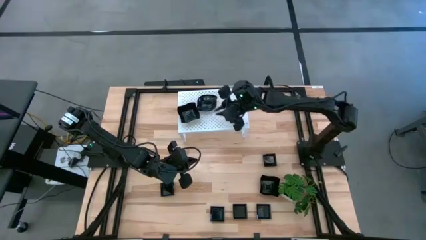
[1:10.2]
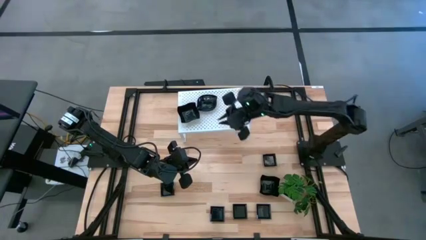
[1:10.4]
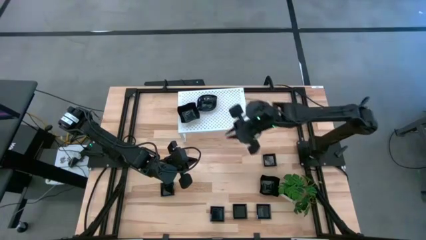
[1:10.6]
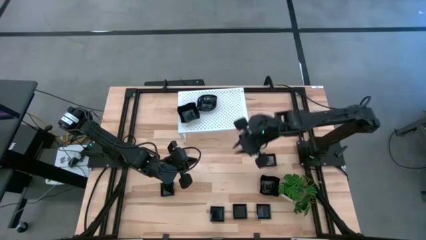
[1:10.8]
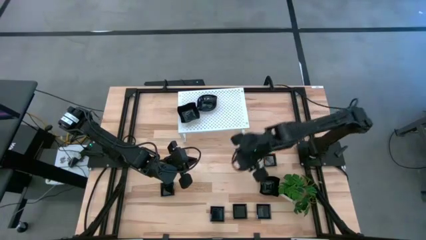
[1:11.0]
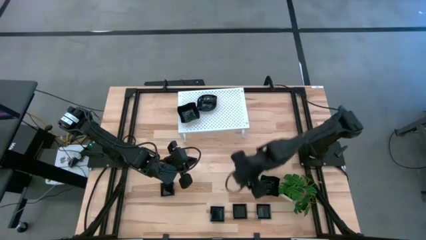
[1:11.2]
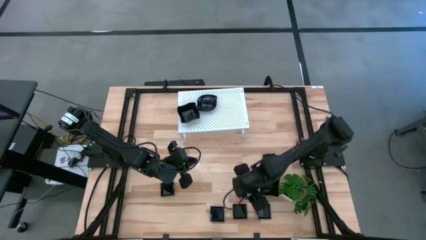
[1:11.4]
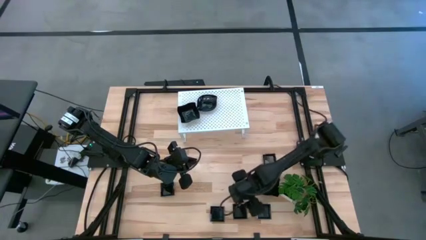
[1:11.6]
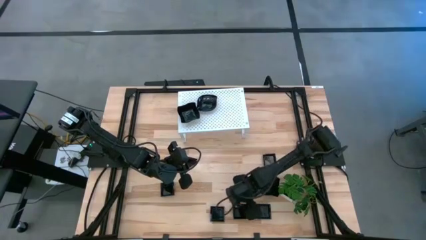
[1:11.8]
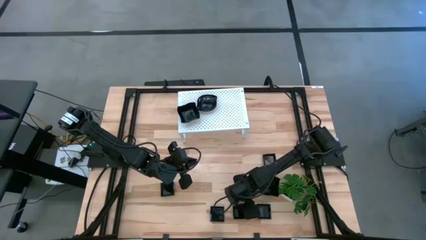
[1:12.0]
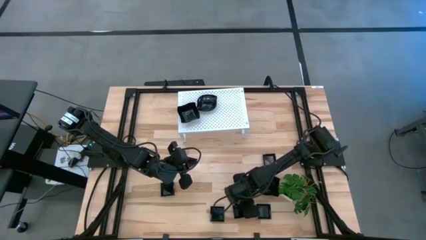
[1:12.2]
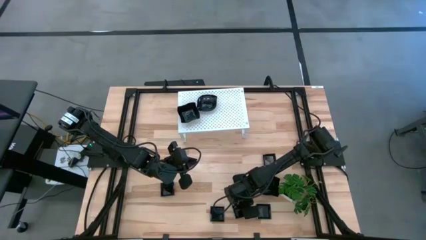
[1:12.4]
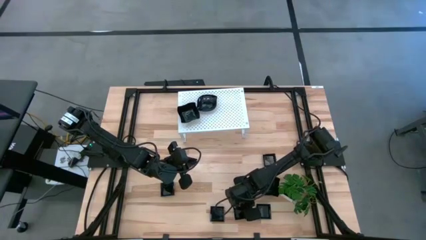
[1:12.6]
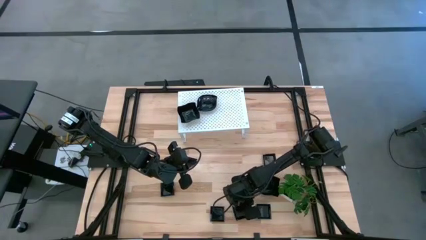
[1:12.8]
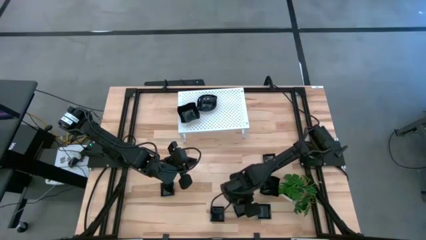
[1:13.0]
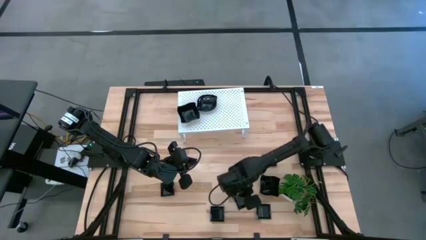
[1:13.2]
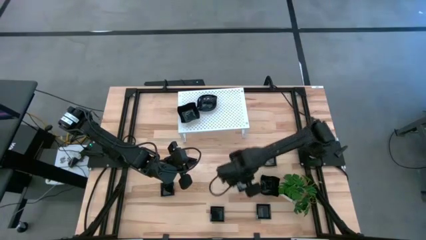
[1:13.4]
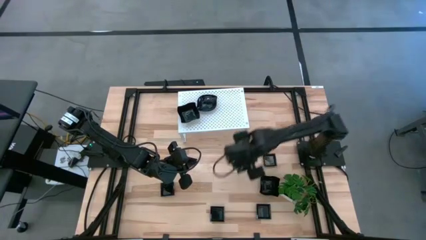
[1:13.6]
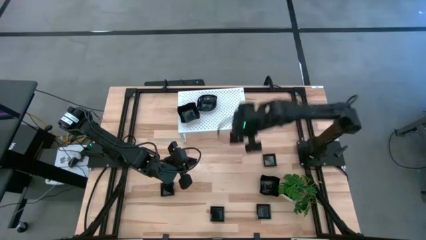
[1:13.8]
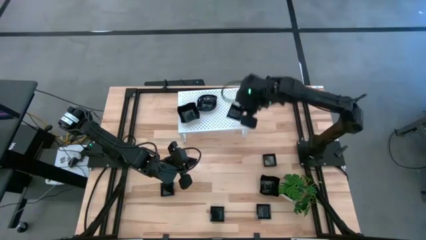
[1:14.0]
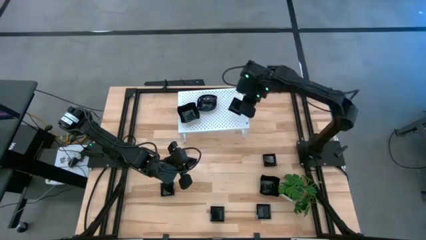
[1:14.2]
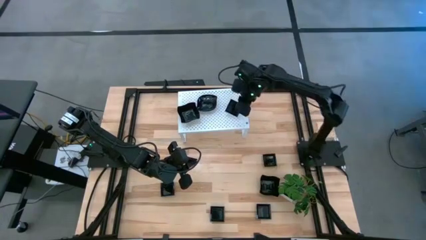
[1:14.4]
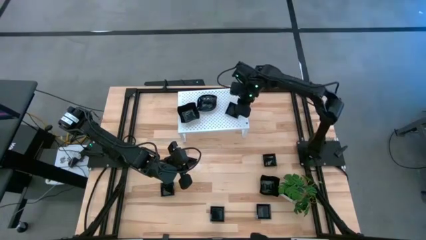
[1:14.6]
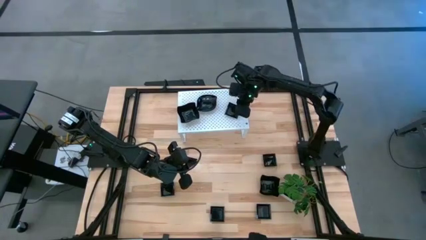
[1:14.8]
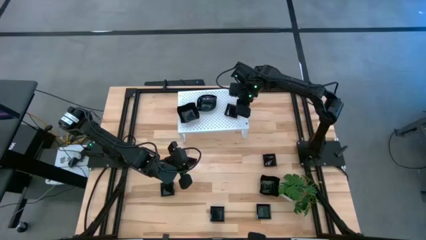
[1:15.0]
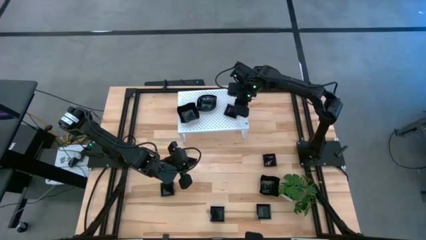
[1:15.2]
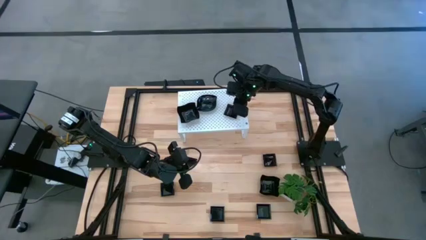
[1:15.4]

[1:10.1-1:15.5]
Task: Pick & Place Mini shaped plates
Put the black square plate on the shelf

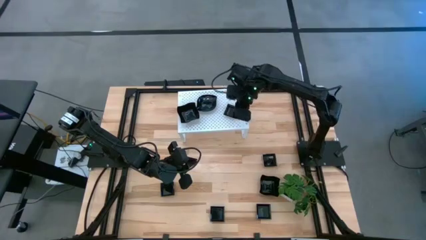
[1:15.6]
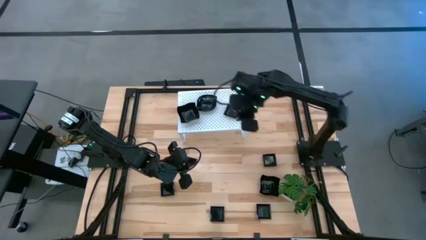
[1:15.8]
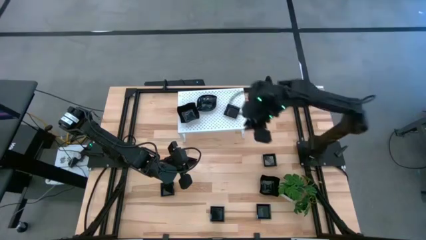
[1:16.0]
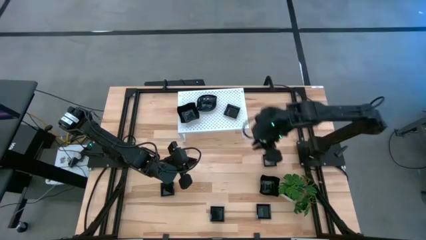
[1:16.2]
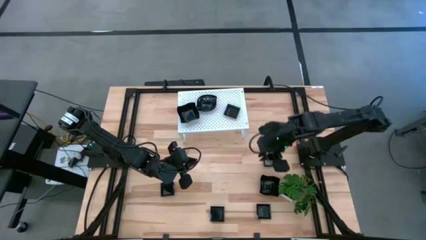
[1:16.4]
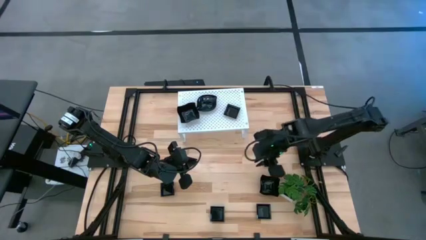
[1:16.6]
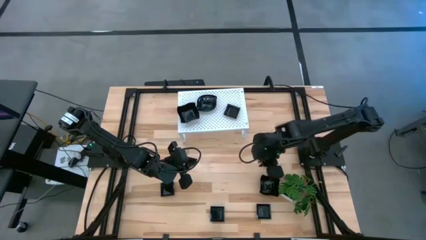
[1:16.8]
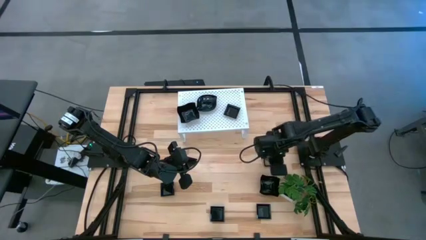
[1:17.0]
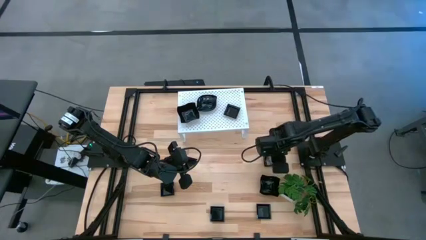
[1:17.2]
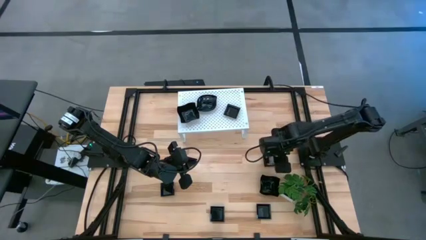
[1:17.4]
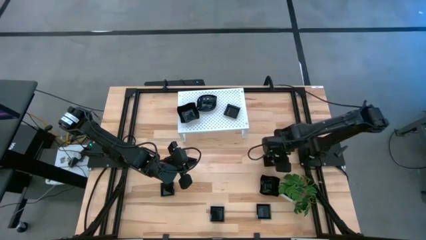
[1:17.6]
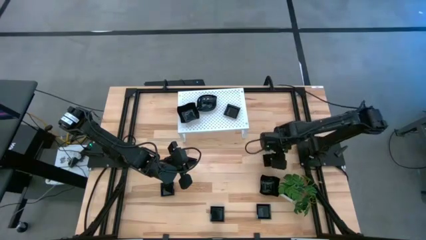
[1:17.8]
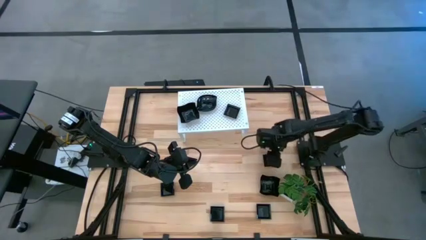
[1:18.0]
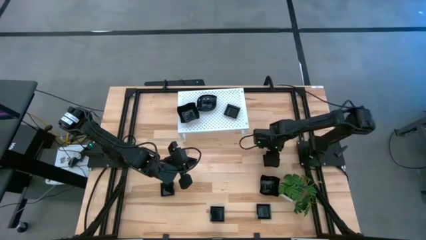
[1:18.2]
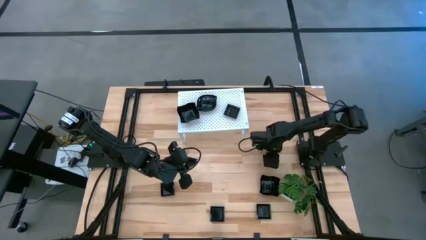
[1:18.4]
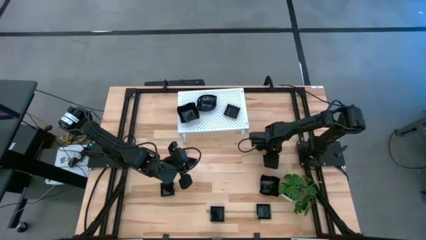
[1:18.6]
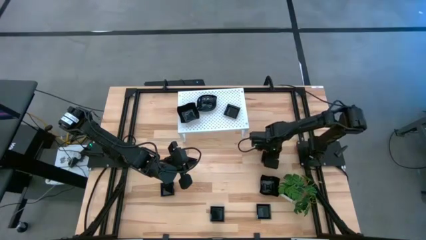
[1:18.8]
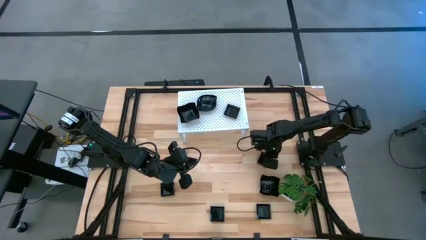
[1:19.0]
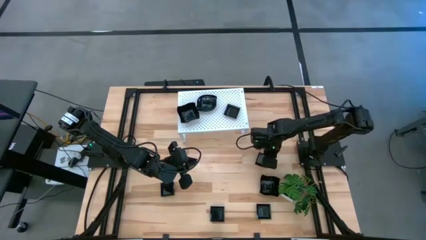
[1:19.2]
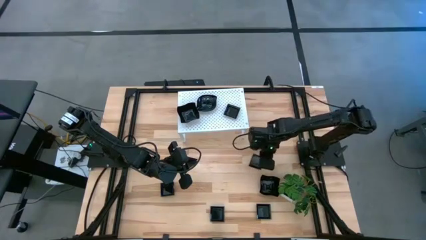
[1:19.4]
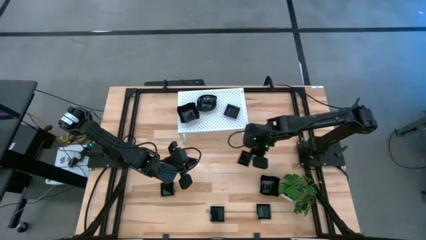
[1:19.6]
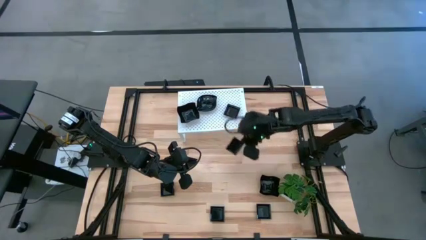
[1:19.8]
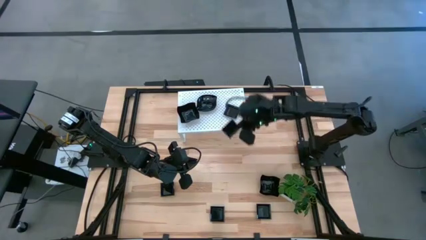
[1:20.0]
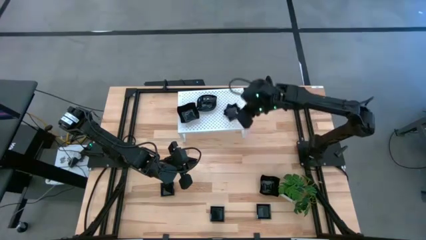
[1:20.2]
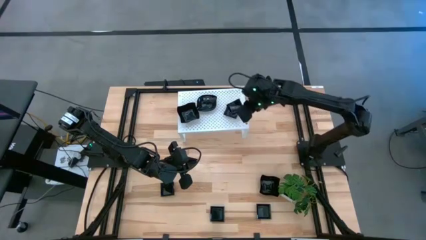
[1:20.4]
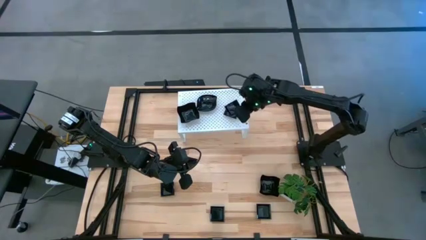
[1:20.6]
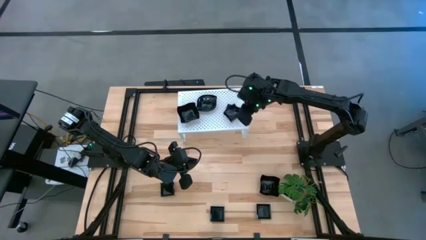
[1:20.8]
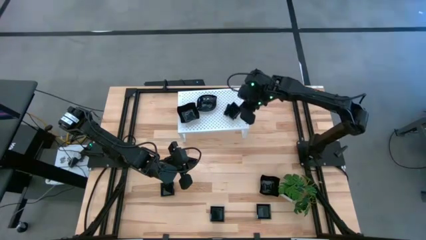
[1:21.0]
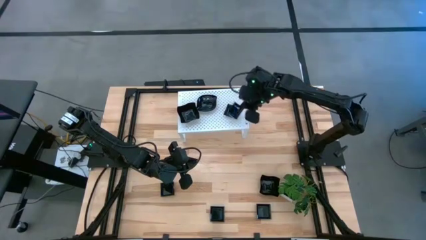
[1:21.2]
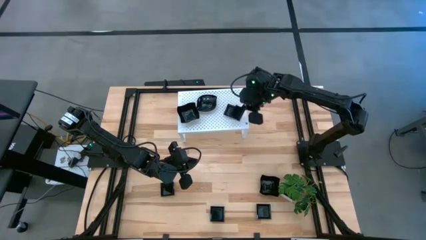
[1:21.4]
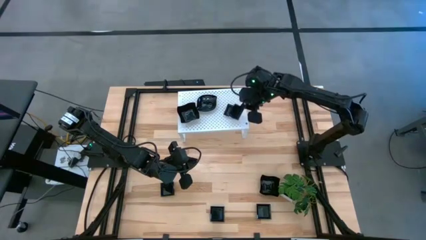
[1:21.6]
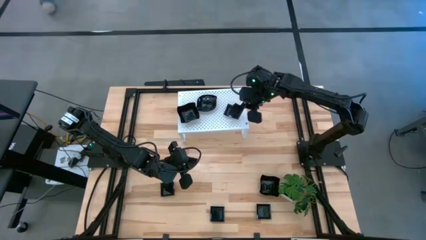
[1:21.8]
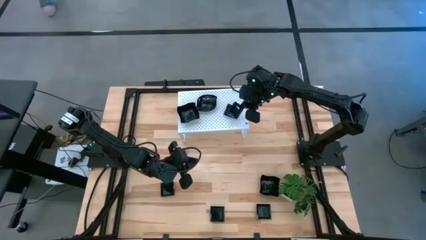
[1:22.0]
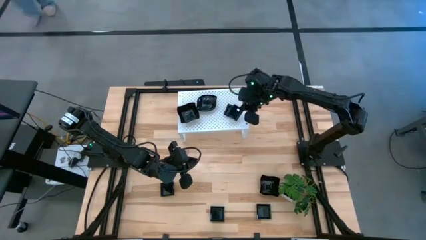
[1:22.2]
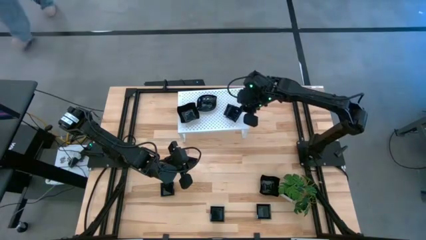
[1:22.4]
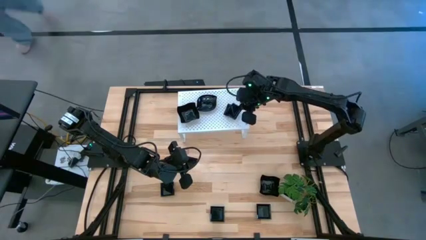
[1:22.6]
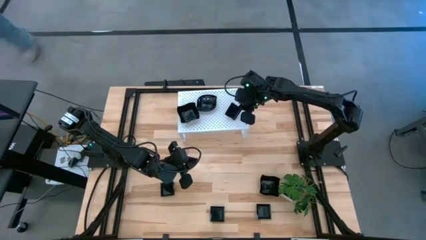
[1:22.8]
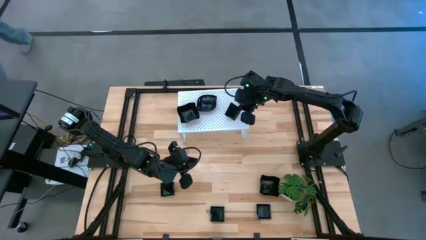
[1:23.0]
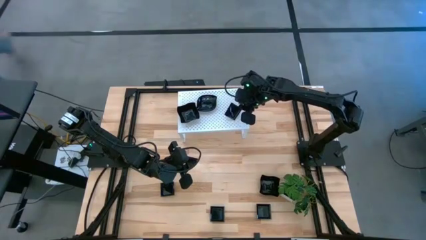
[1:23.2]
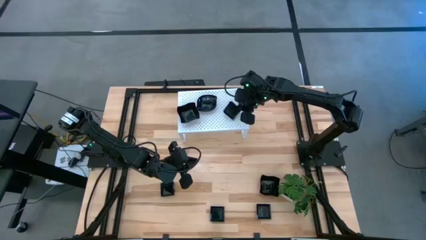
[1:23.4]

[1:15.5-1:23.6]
Stack the black square plate on top of the black square plate on the shelf

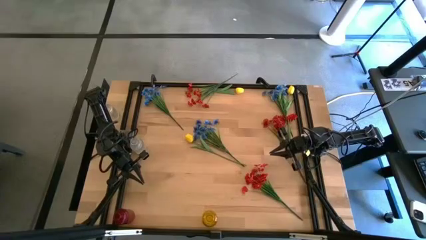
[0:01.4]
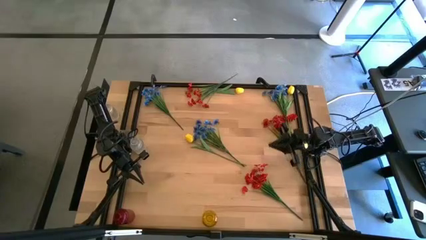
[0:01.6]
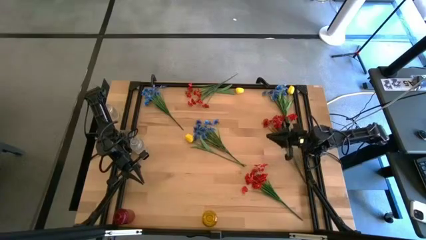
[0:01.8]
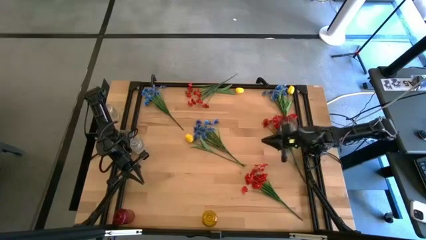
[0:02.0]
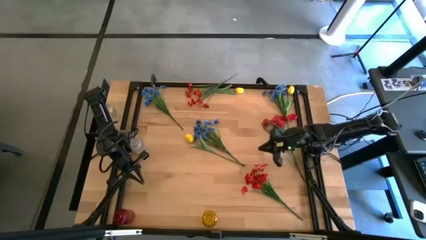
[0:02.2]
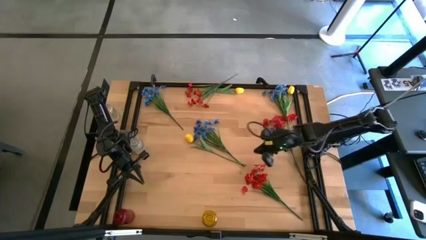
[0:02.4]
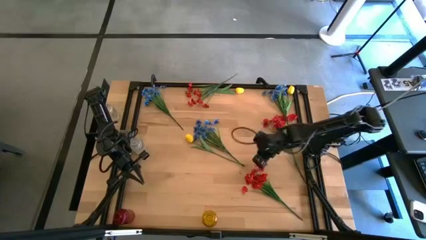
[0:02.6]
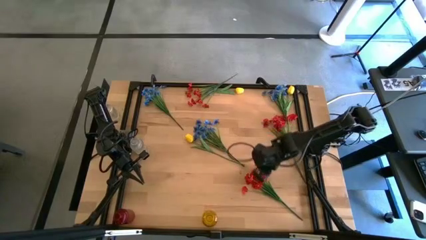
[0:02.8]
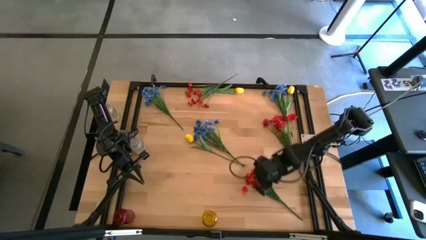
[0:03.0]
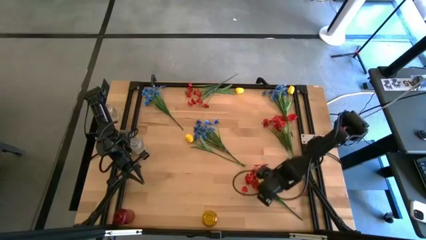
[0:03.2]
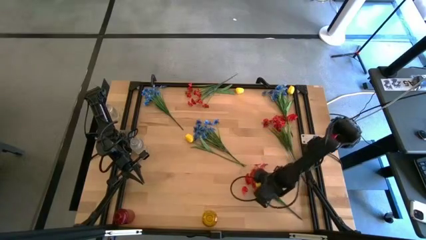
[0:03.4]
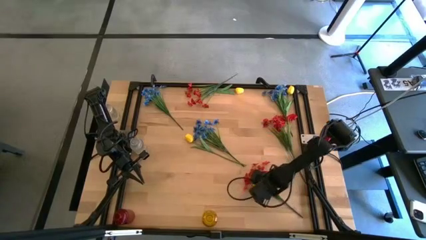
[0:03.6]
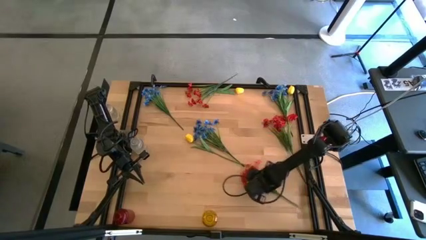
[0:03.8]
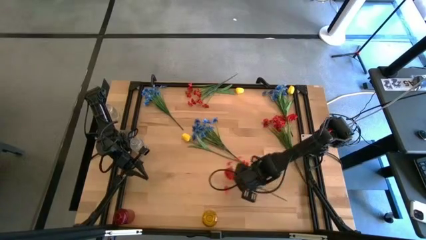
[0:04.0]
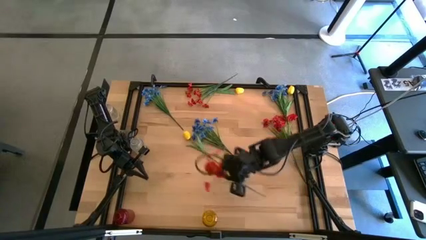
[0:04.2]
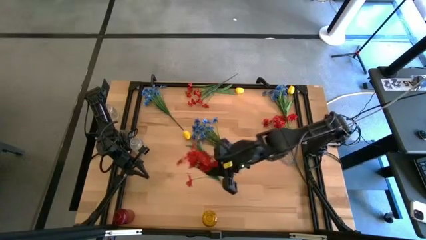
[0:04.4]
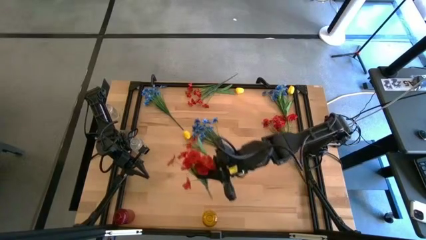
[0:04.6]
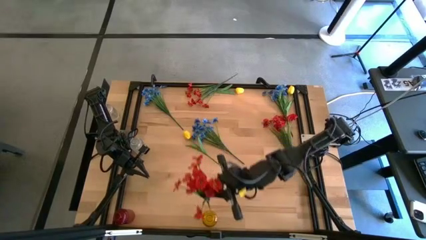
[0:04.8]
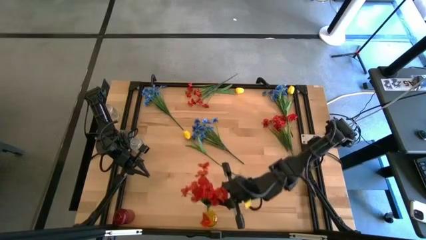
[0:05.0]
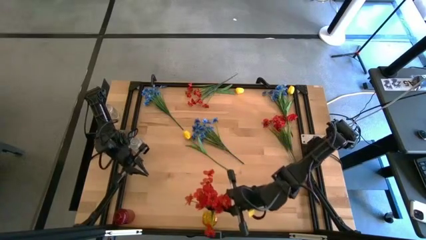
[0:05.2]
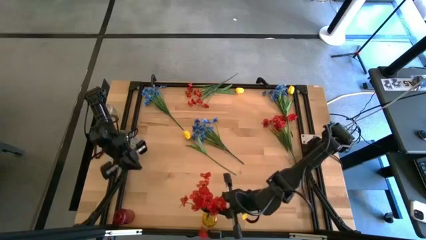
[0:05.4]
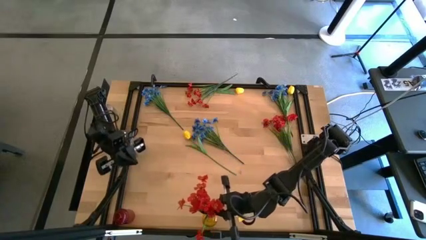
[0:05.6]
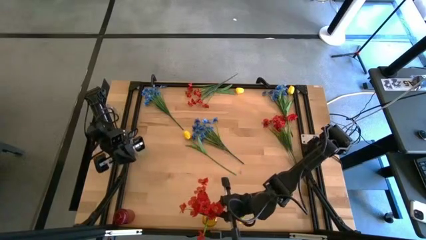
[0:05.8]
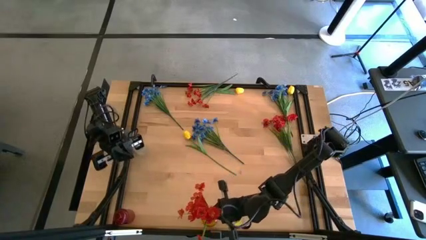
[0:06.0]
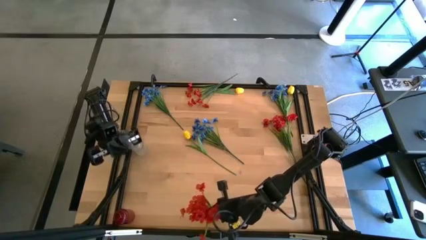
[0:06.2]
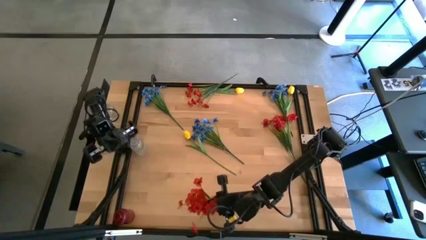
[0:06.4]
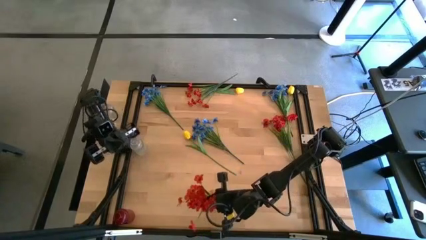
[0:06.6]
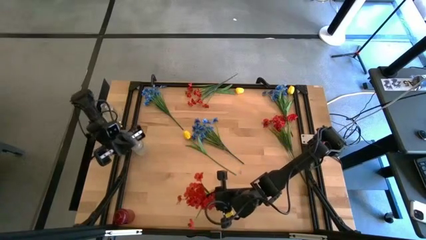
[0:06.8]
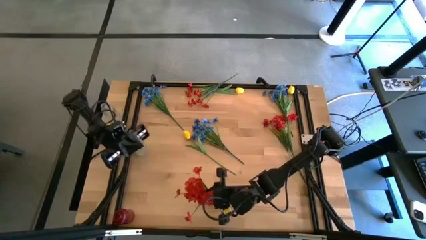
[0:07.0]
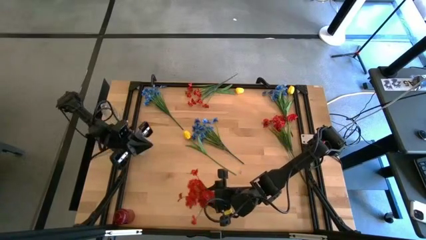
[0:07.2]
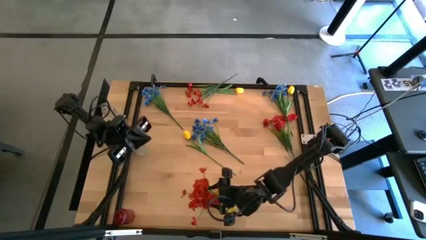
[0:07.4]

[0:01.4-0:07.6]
Task: Sort flowers into vase by color
Put the bottom right red flowers into the yellow vase
